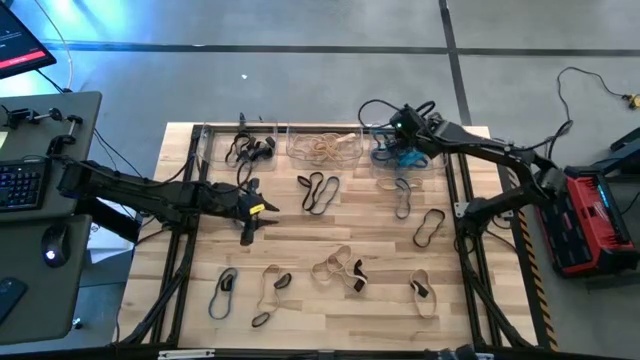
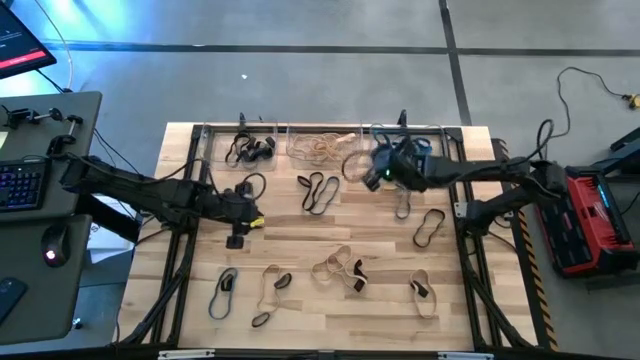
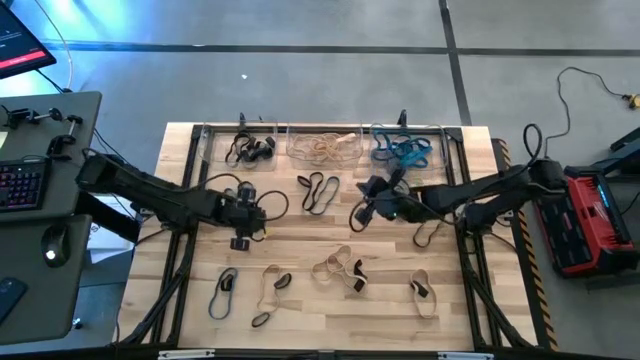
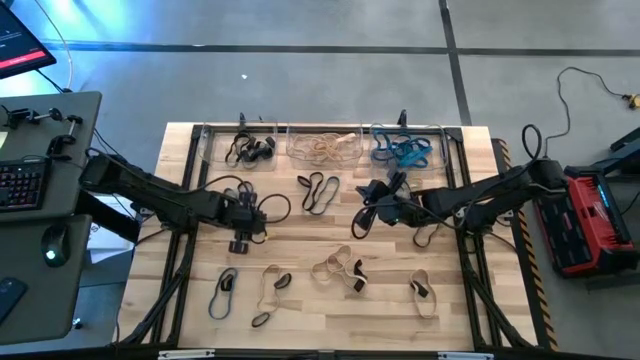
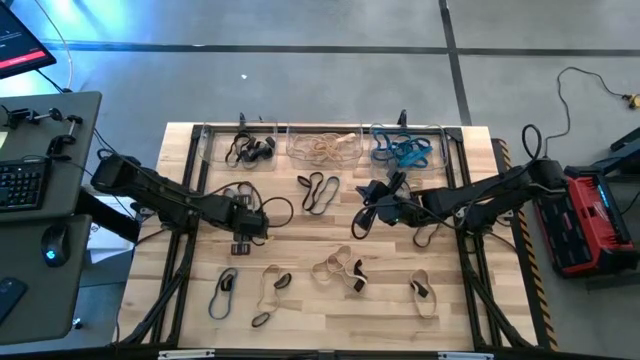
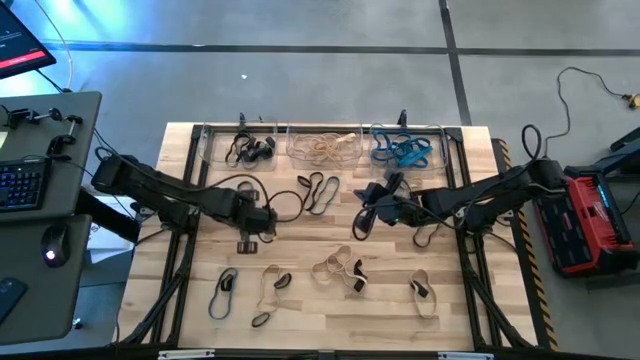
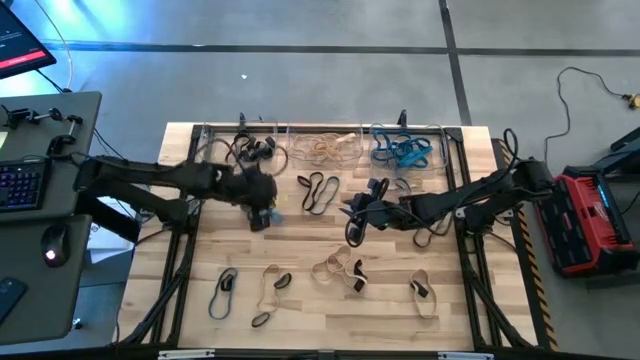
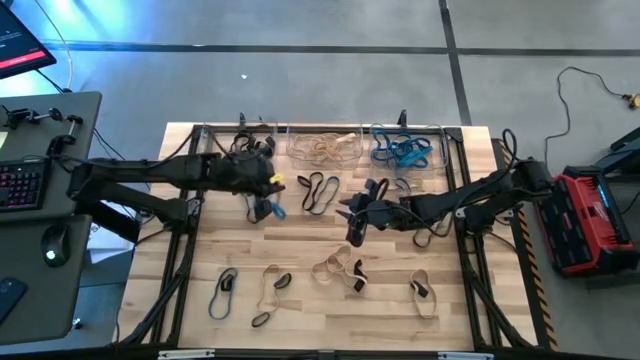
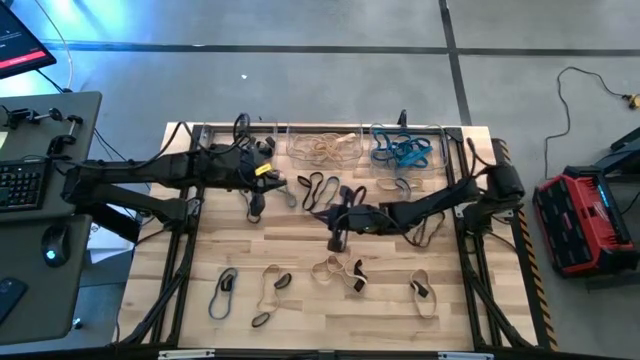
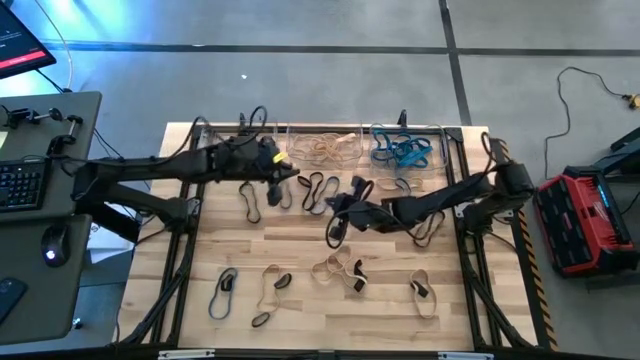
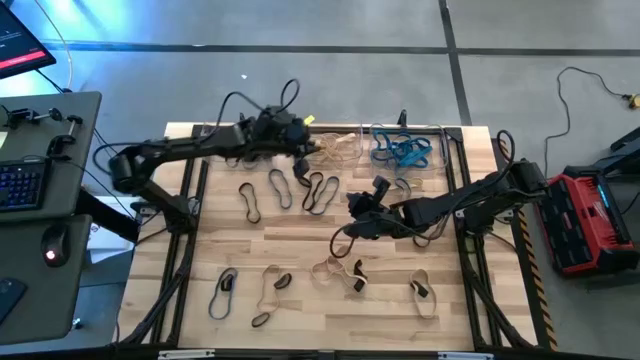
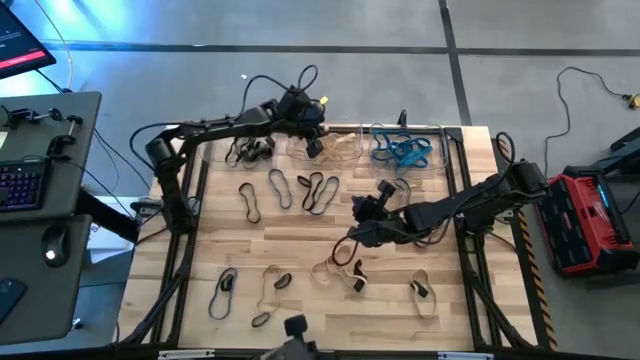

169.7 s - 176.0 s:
Task: Sort rubber bands into baskets
Put the brown rubber band into the middle transparent bin

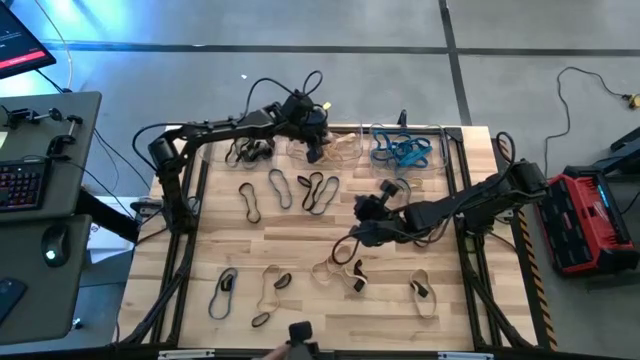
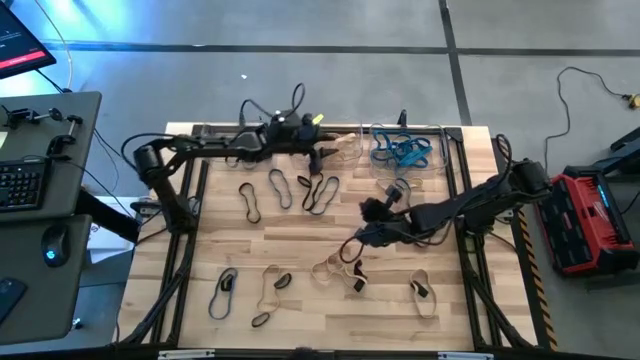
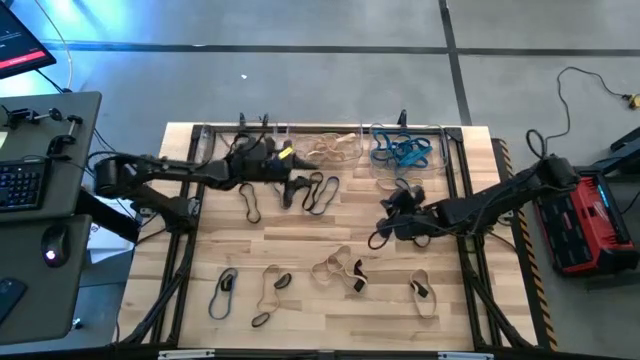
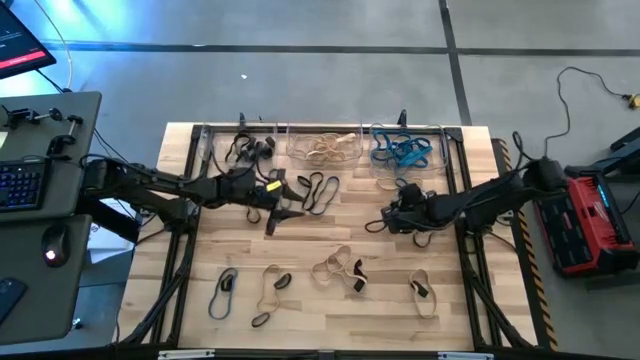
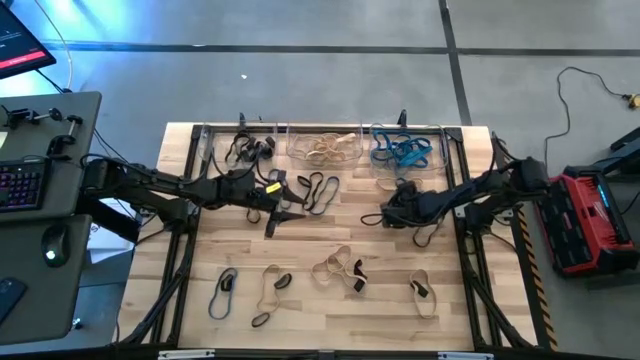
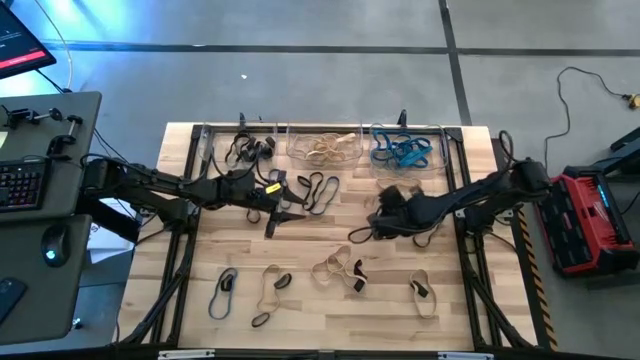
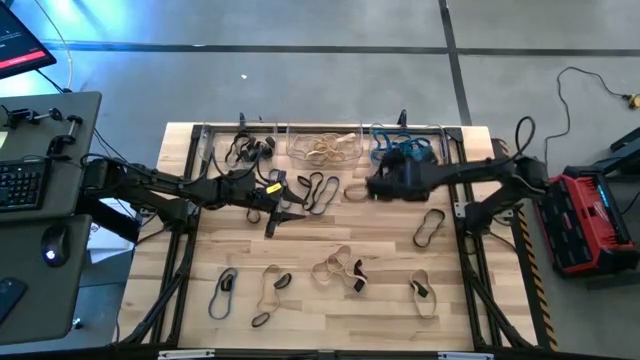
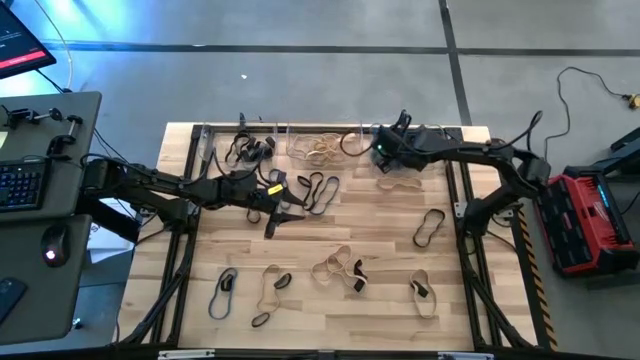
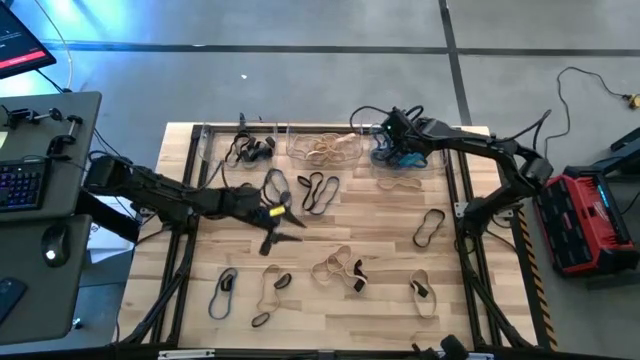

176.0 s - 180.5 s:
Put the blue rubber band into the right transparent bin

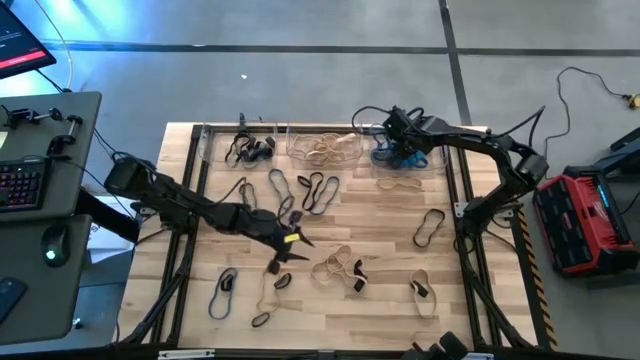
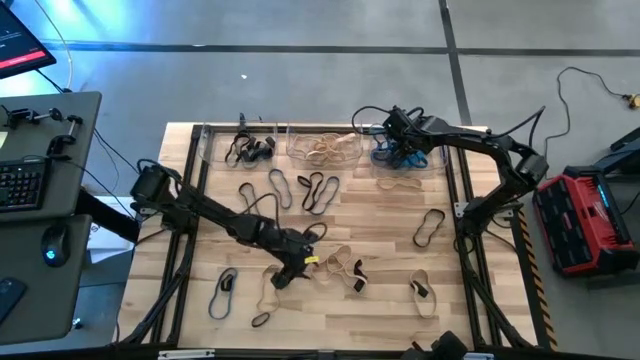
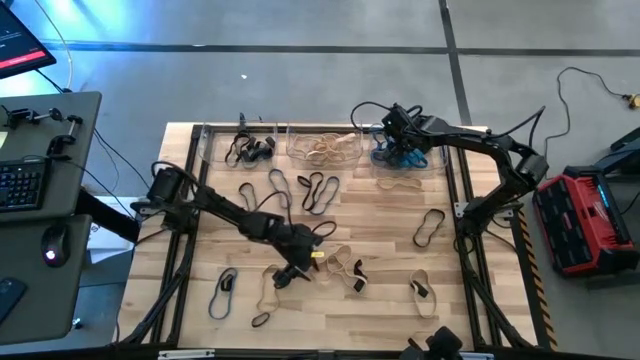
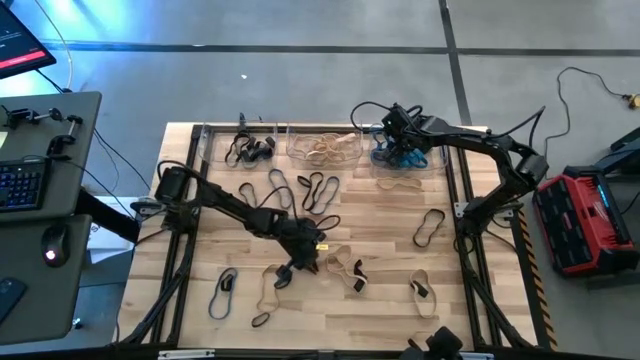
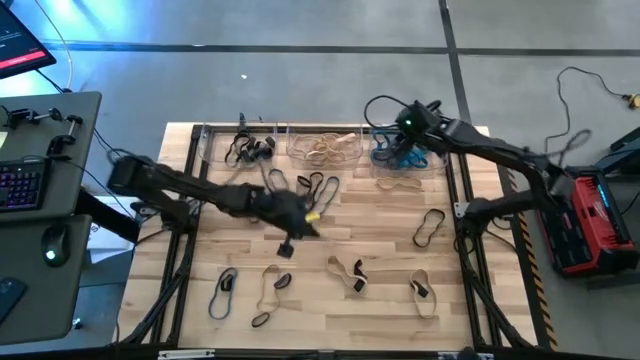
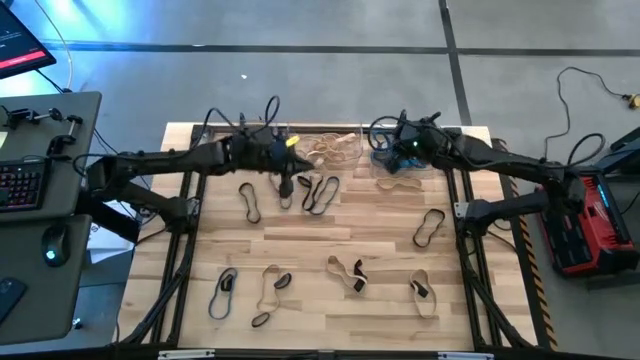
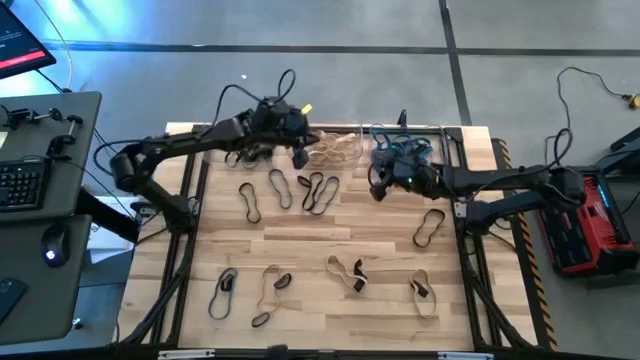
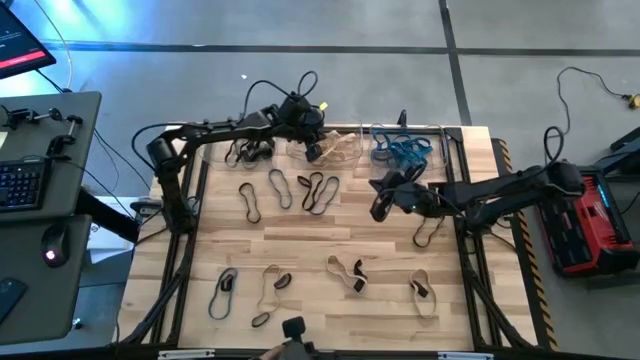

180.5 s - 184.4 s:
Put the brown rubber band into the middle transparent bin

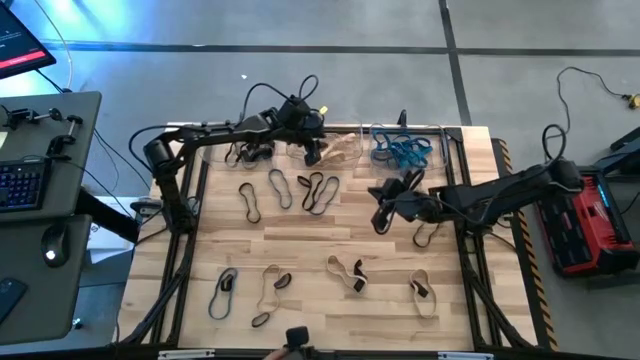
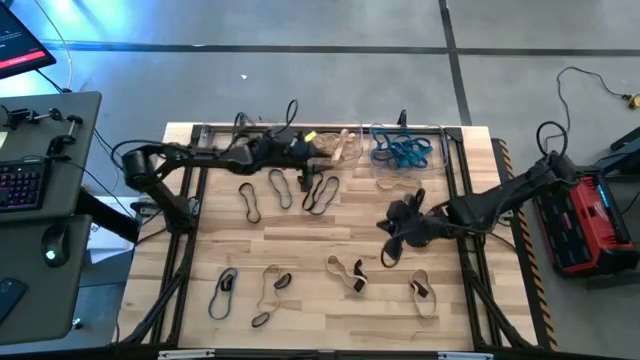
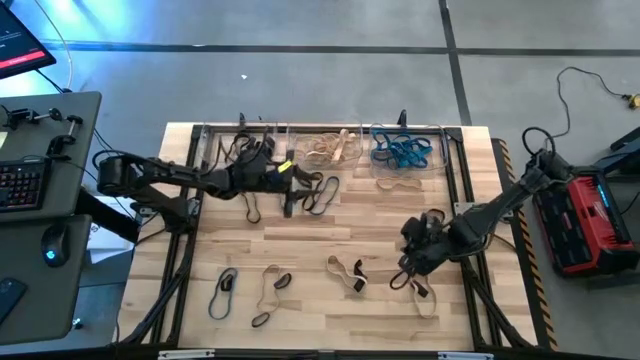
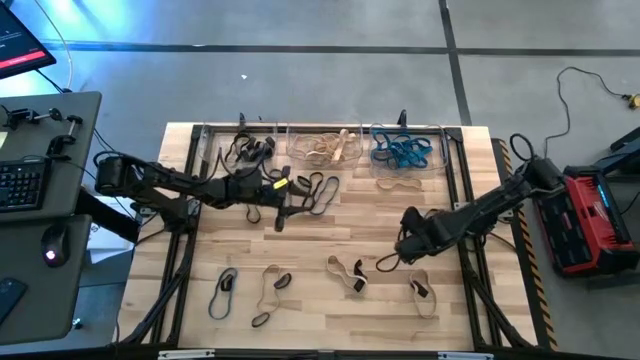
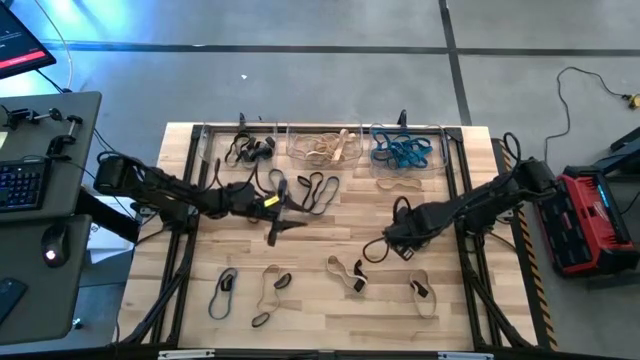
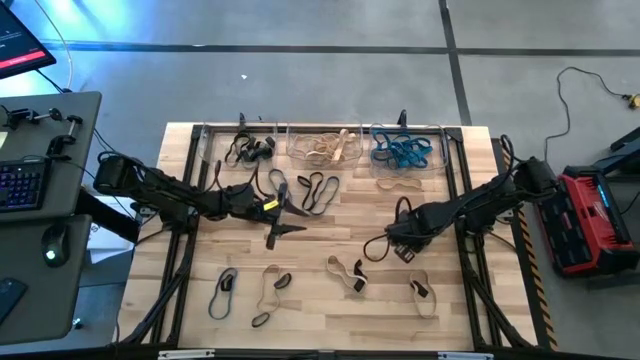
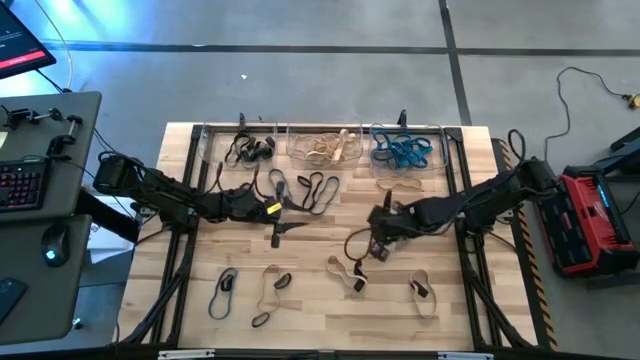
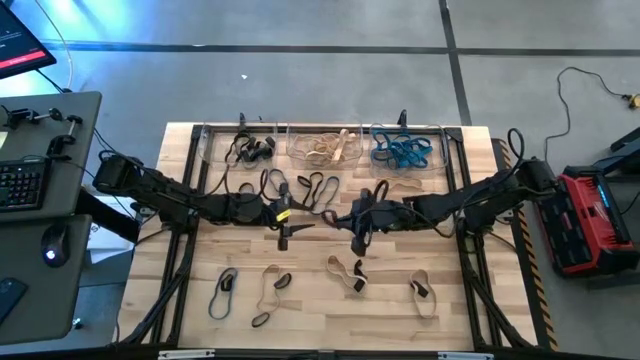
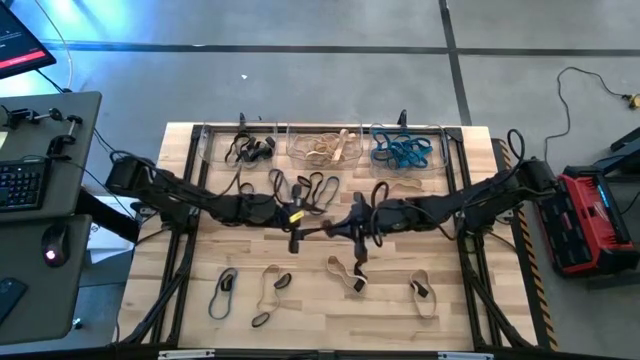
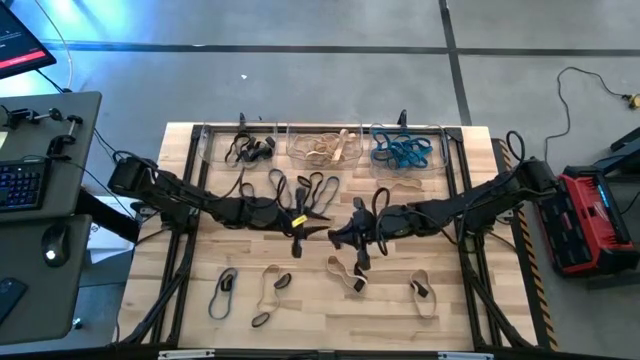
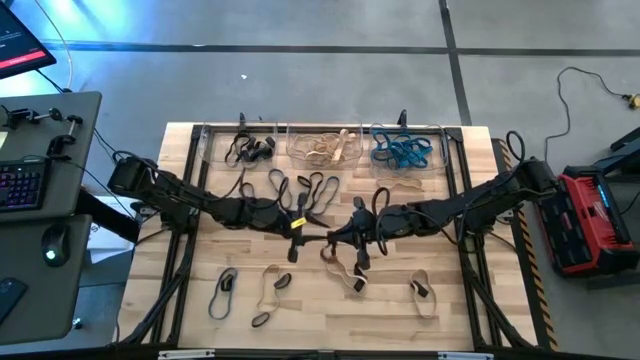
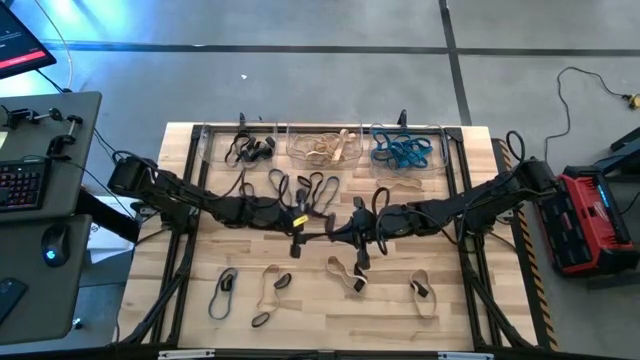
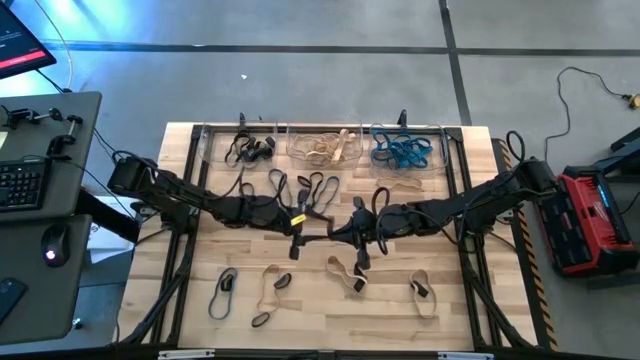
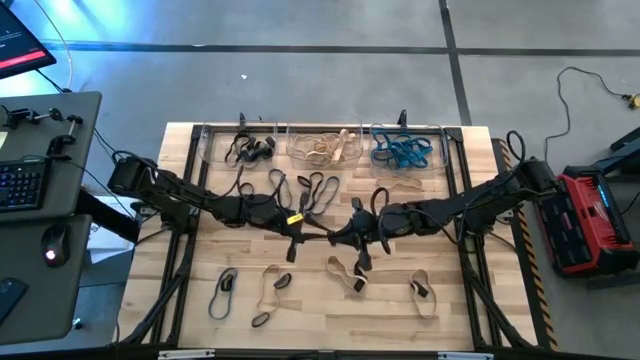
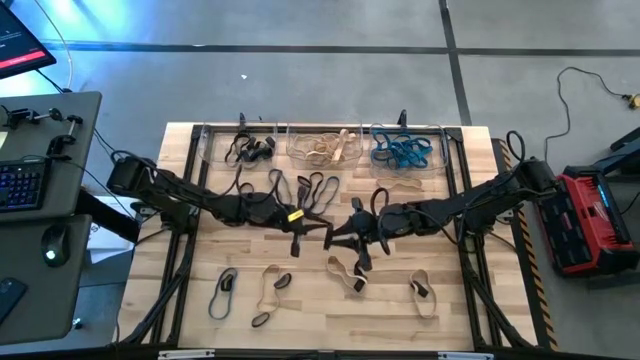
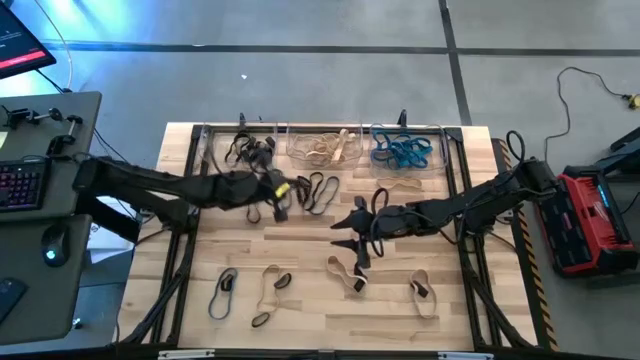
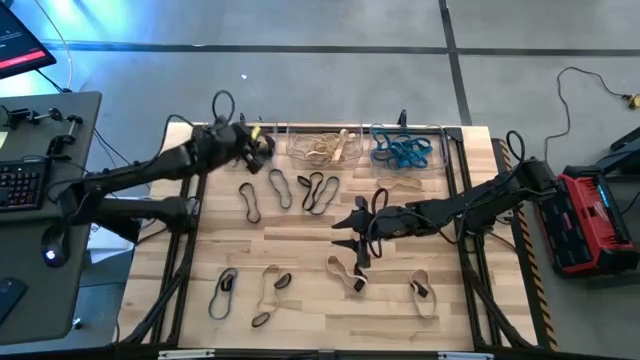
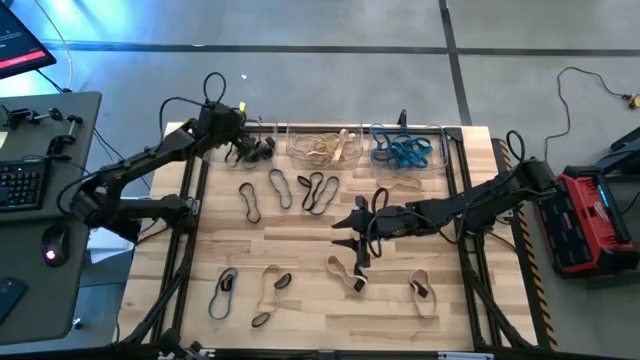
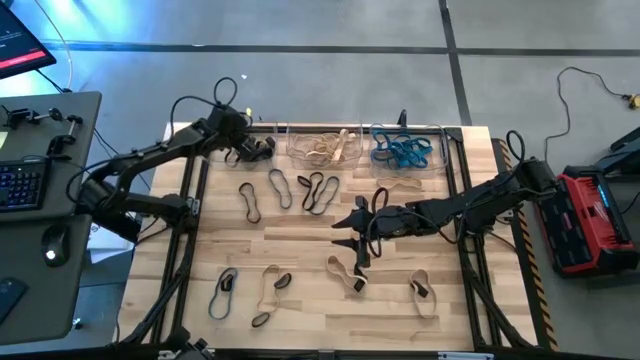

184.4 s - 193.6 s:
Put the black rubber band into the left transparent bin
